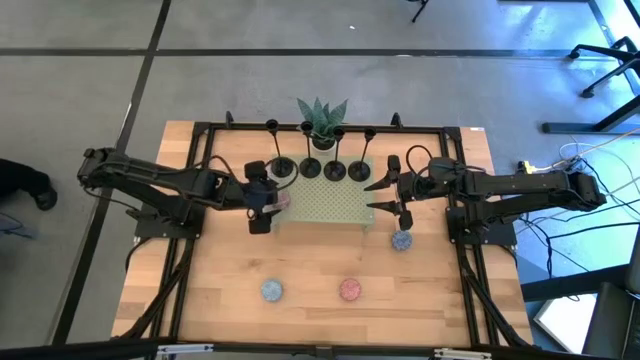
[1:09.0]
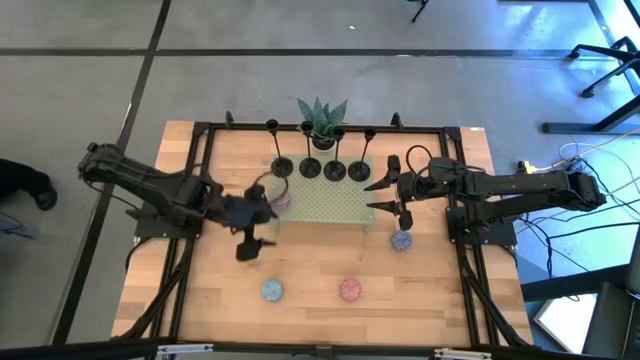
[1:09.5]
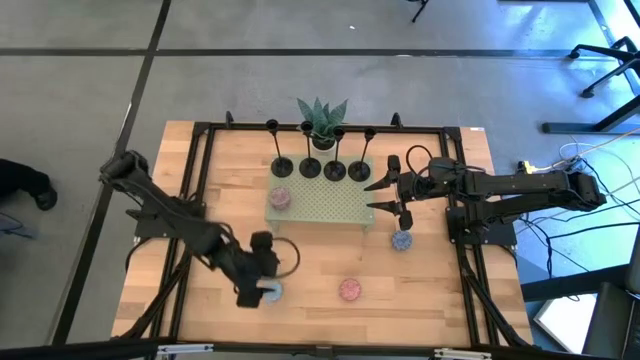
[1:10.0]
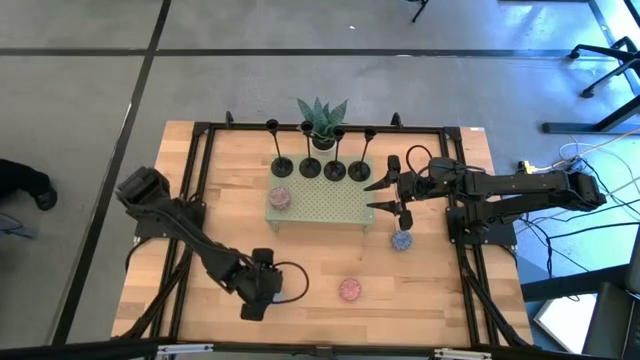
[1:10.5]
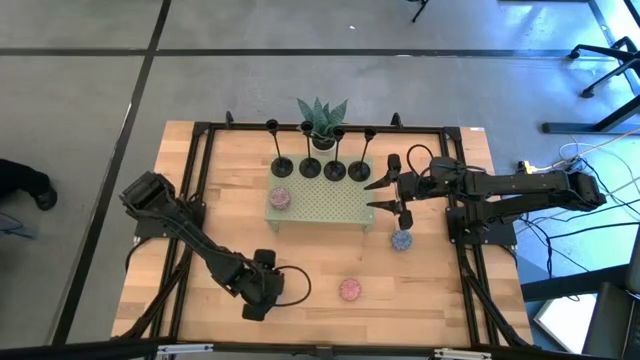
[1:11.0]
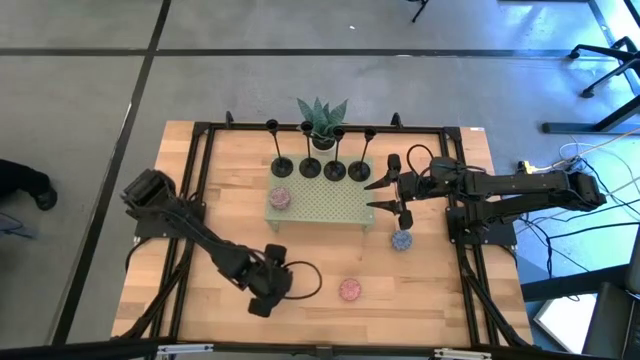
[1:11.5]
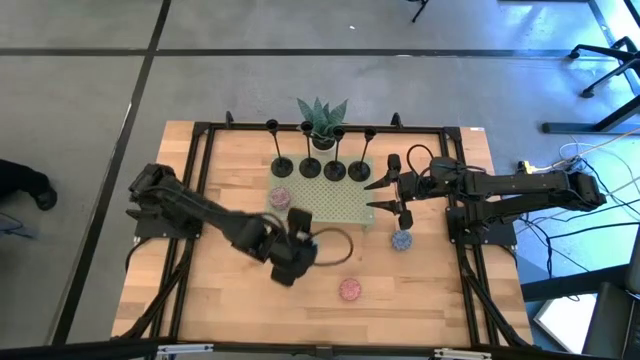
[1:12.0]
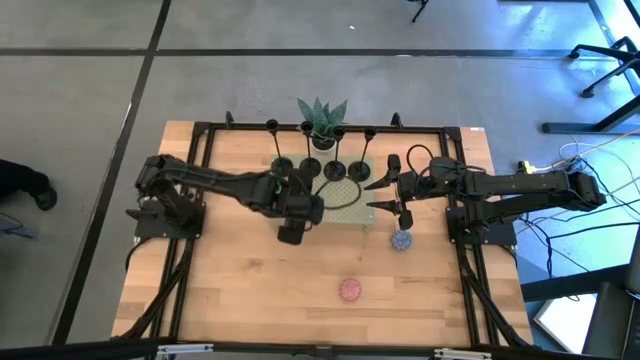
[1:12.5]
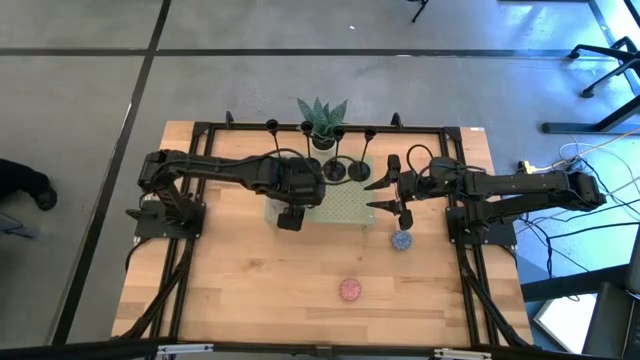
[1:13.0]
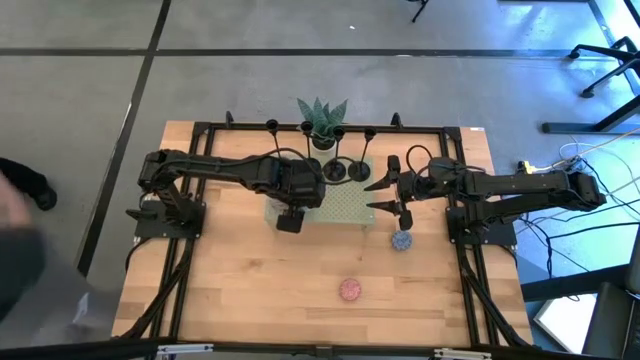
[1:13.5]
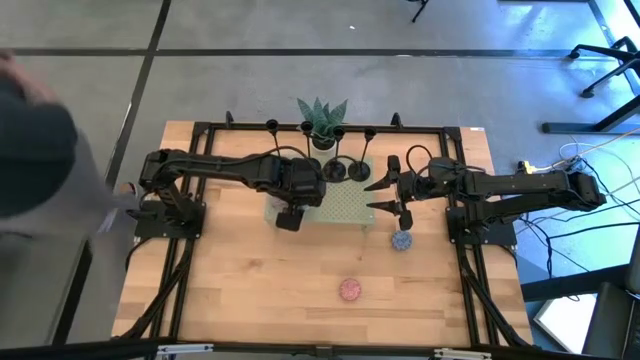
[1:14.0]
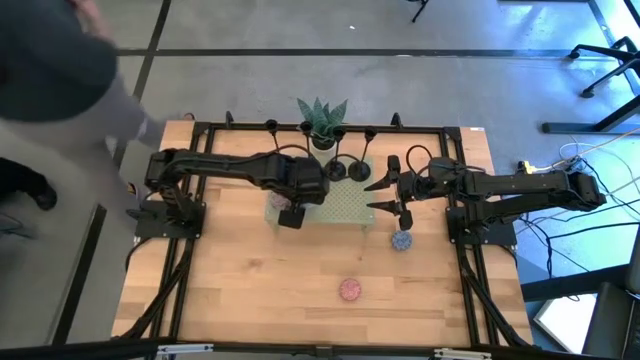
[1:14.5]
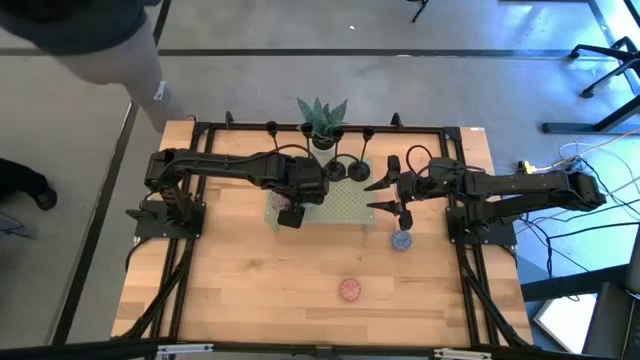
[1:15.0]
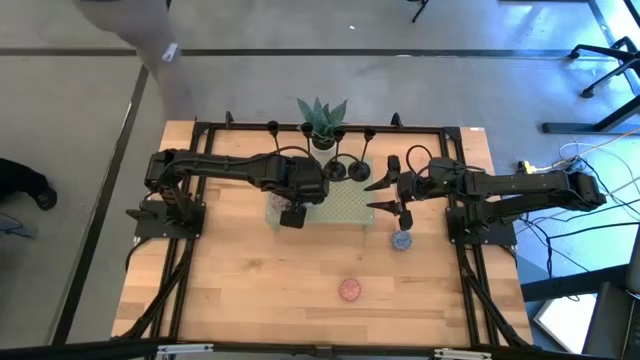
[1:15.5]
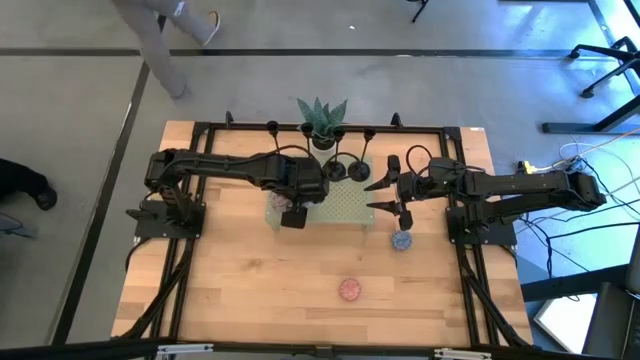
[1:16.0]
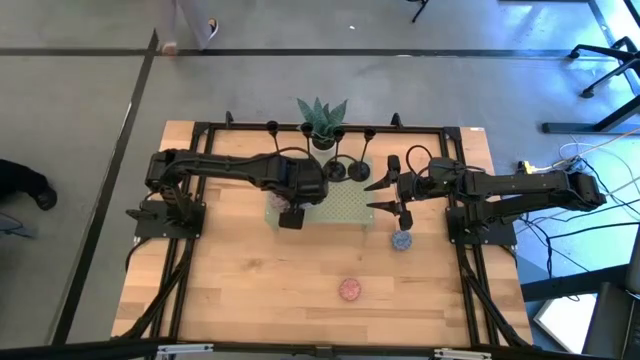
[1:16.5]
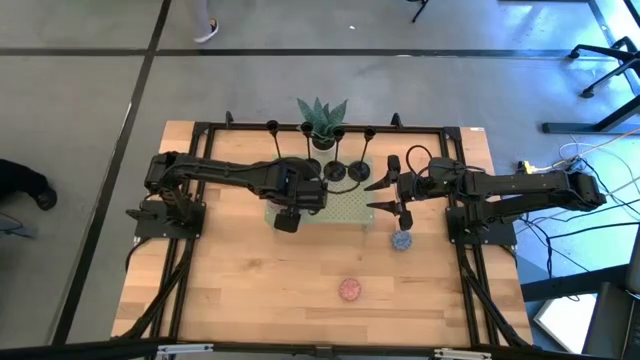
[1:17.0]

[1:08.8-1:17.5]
Task: Pick & Place candle stick holders
Put the light blue scented candle on the shelf

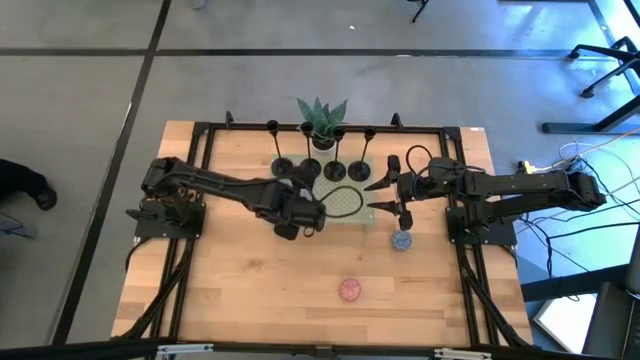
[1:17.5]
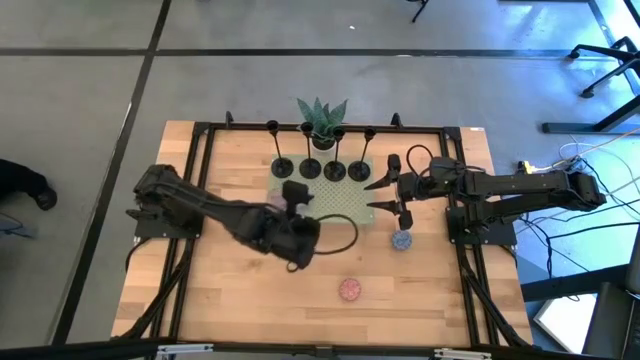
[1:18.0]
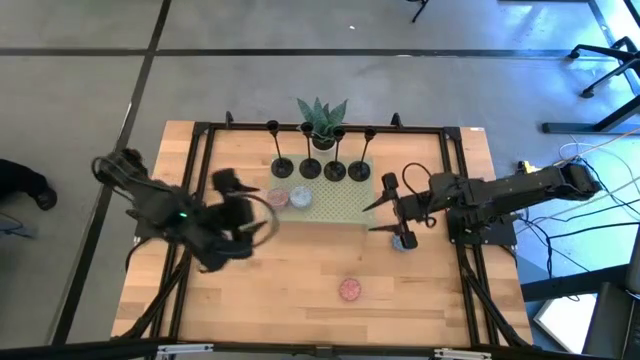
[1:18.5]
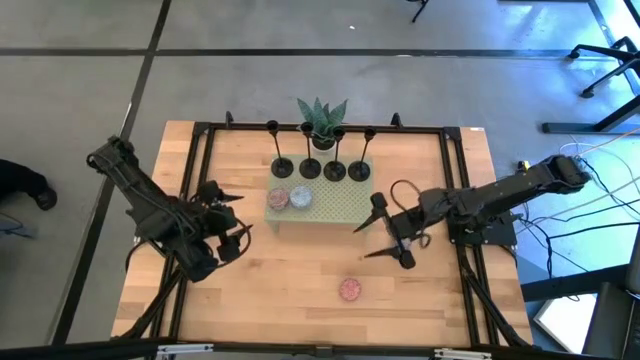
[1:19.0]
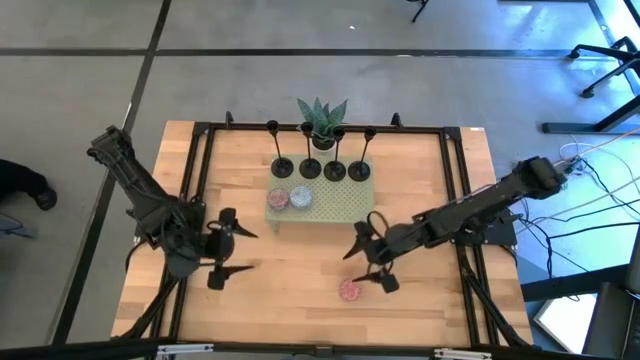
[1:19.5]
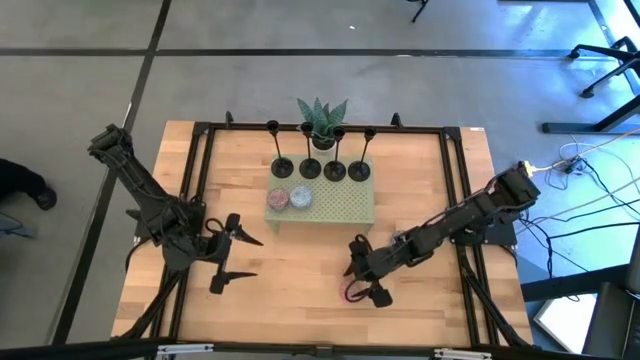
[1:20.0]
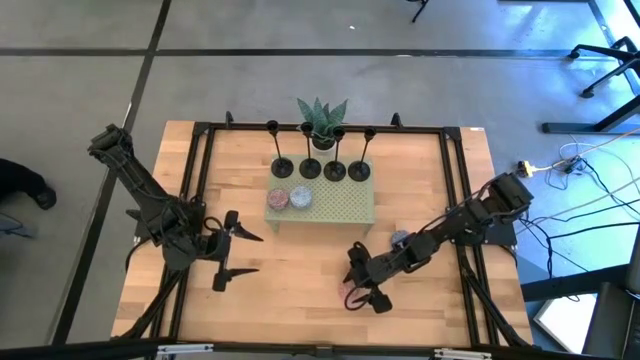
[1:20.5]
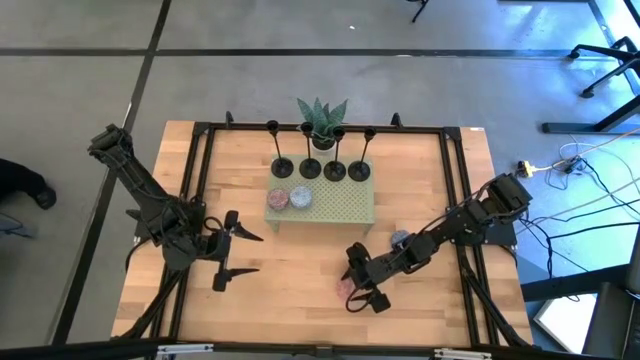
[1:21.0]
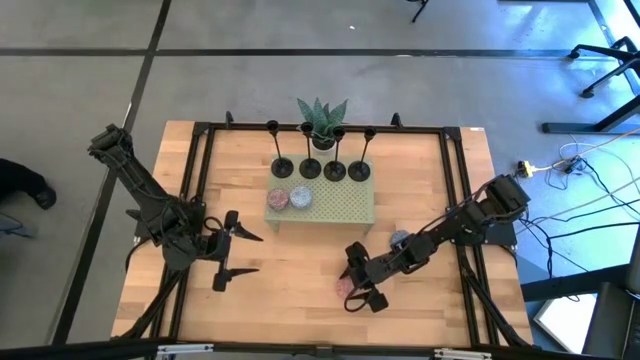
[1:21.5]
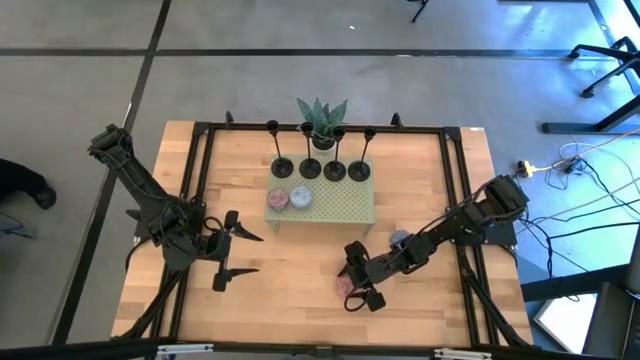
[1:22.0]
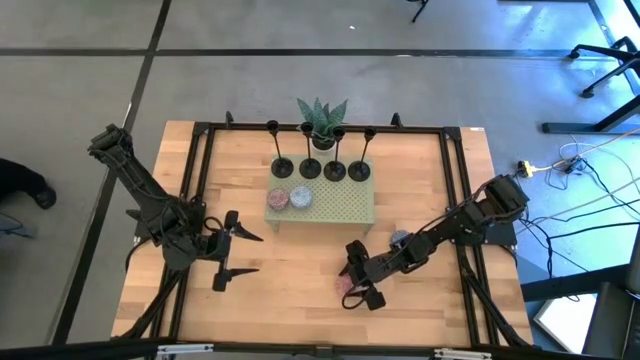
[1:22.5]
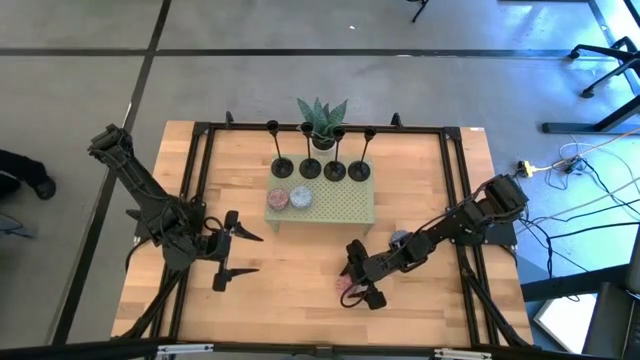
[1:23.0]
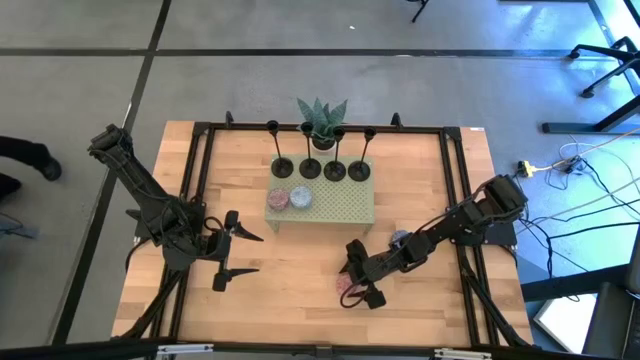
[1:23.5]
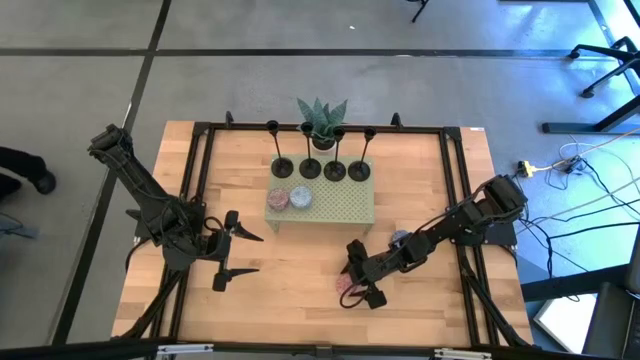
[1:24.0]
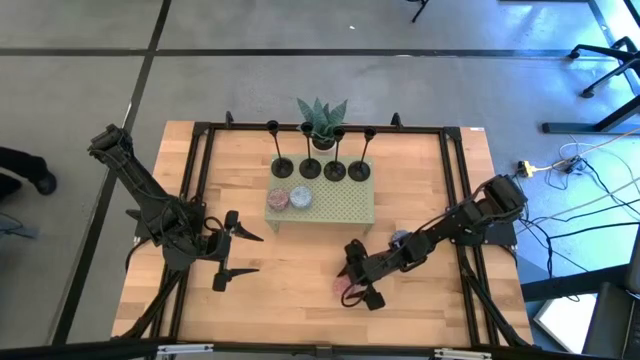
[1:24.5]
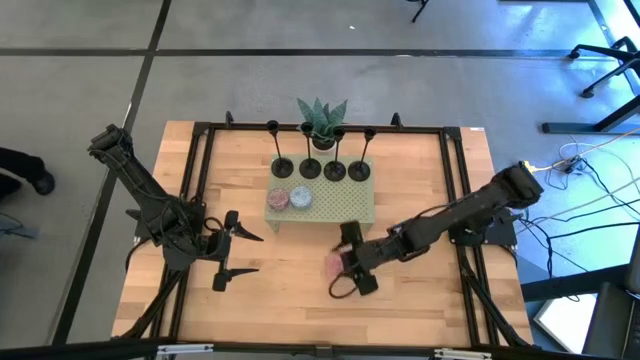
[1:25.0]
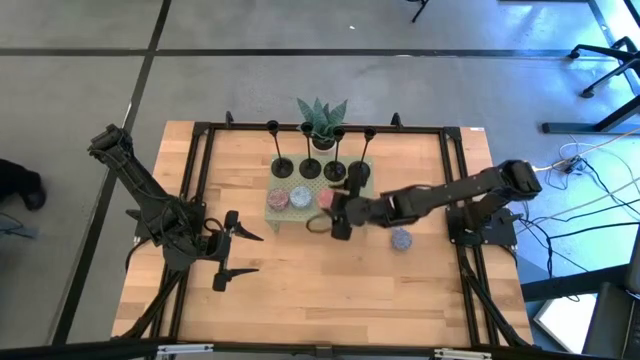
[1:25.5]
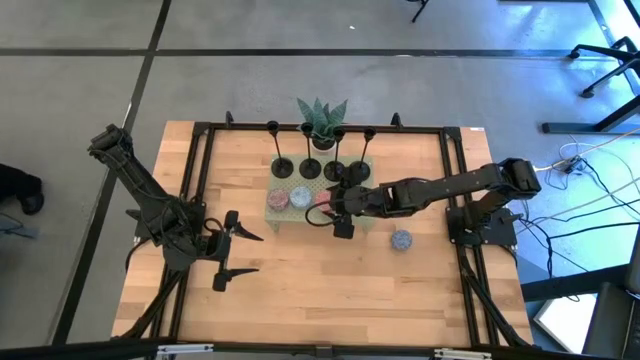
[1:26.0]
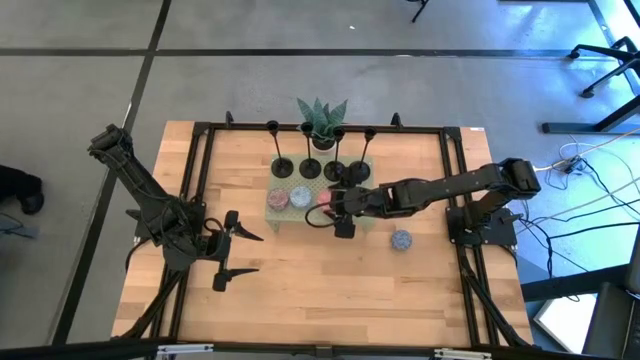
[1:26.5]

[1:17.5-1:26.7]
Put the pink scented candle on the shelf

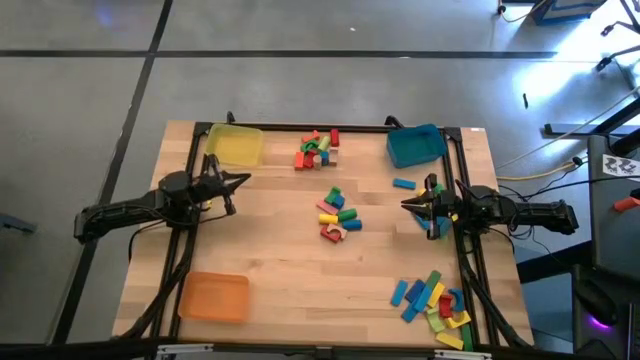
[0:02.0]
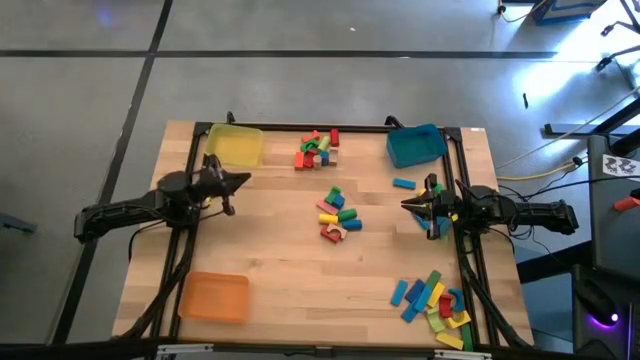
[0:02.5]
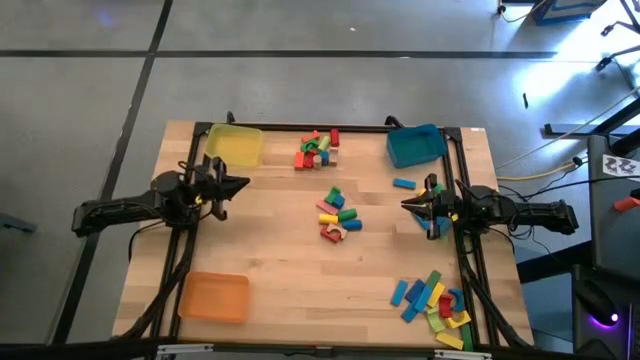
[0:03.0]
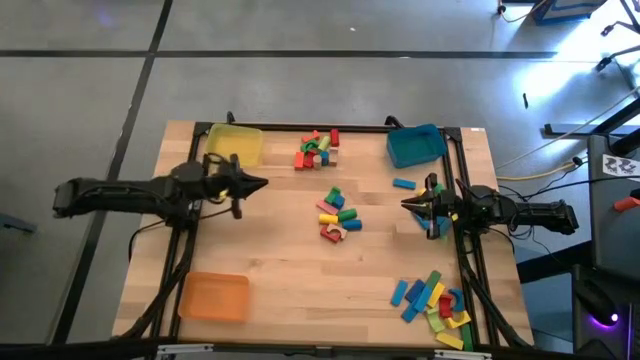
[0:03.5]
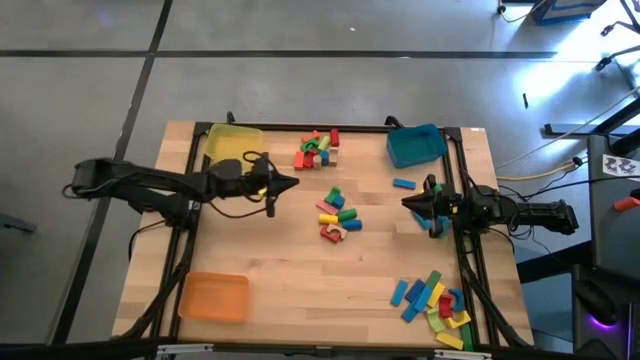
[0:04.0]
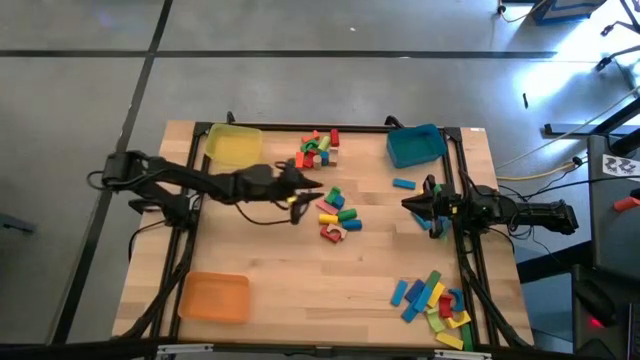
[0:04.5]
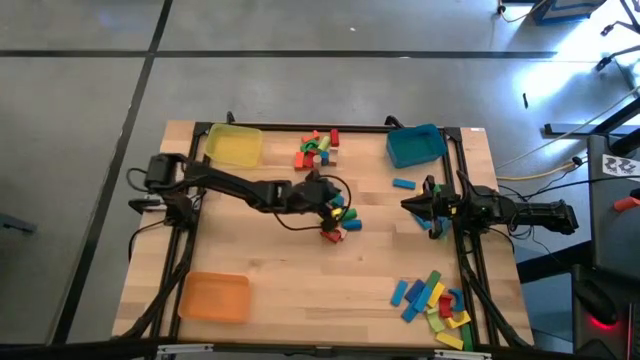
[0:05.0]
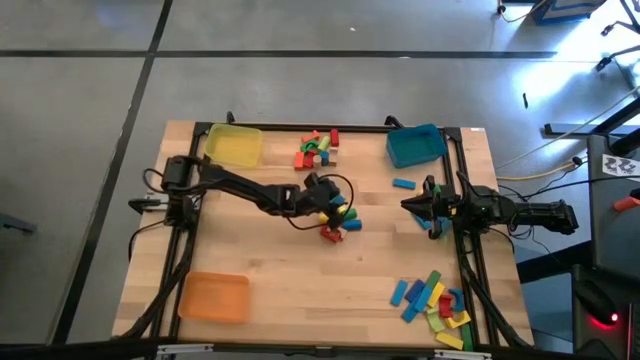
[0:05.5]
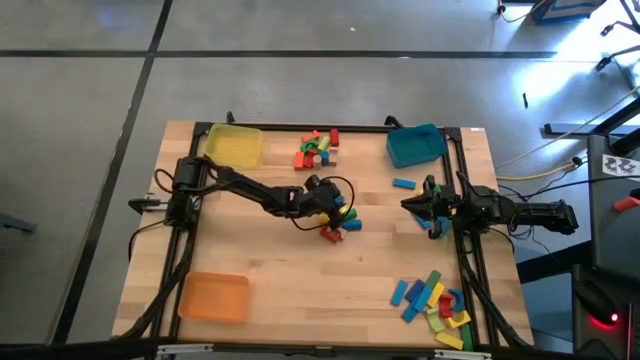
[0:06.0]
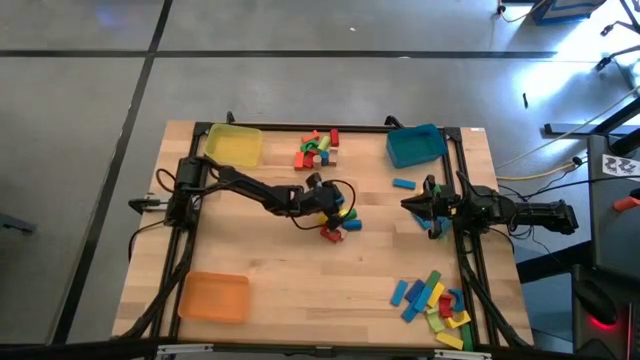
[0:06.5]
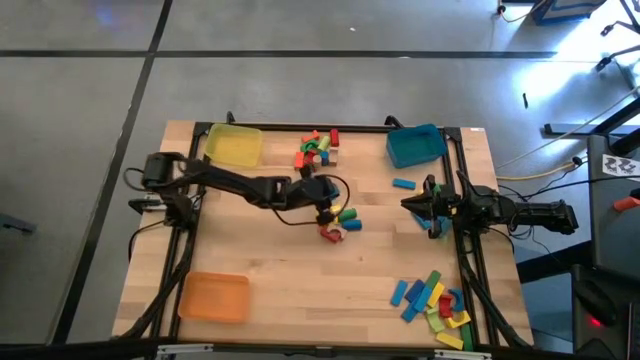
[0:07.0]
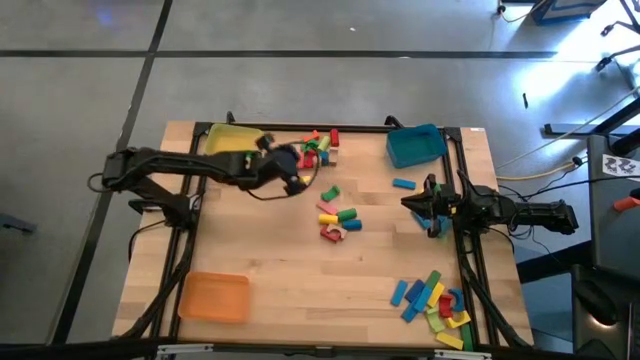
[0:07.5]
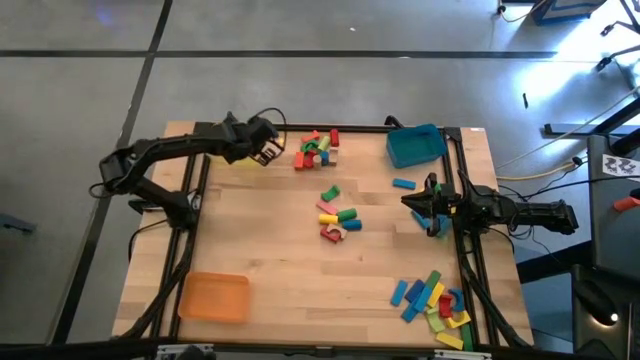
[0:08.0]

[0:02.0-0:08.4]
Task: Sort blocks by size
Put the blue arch block into the yellow bin
